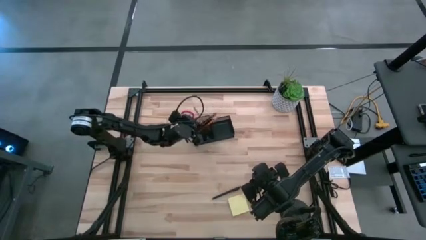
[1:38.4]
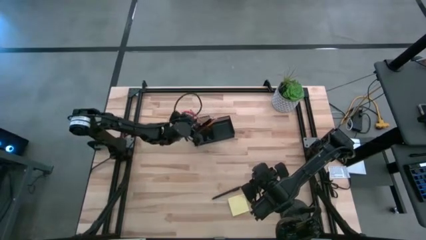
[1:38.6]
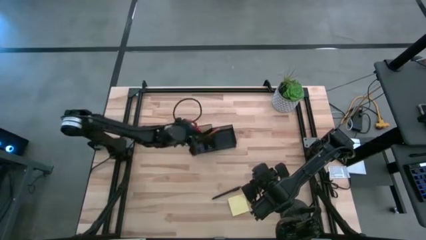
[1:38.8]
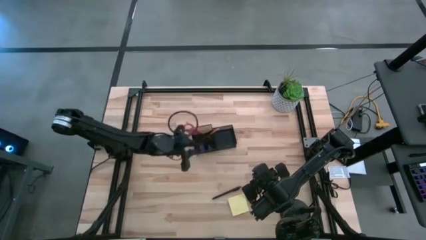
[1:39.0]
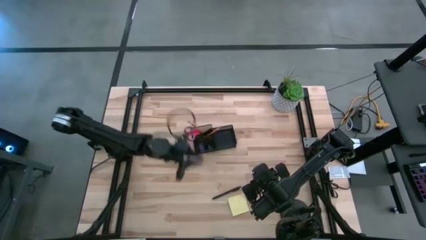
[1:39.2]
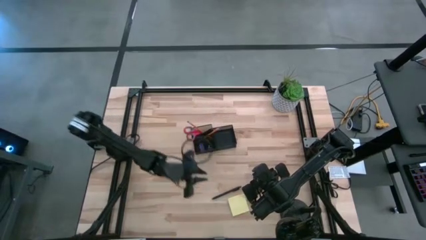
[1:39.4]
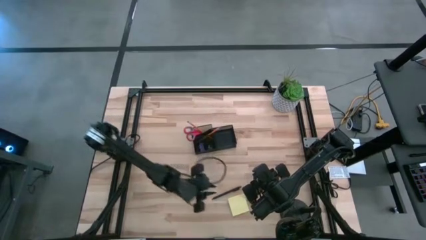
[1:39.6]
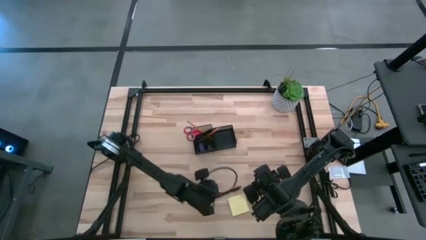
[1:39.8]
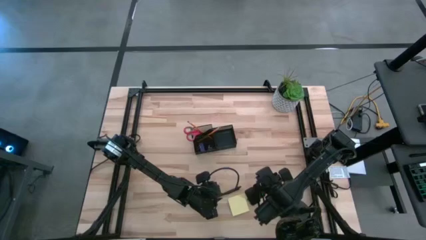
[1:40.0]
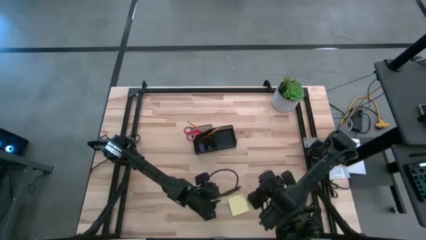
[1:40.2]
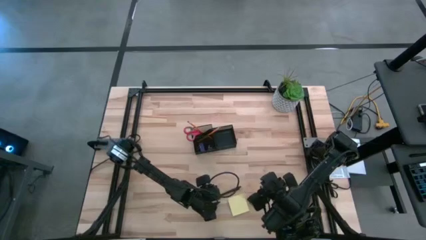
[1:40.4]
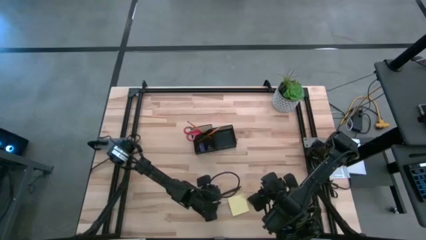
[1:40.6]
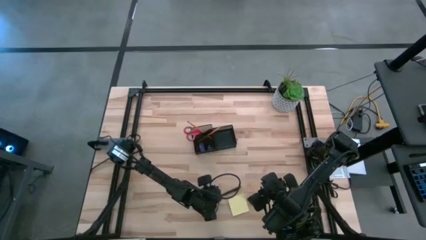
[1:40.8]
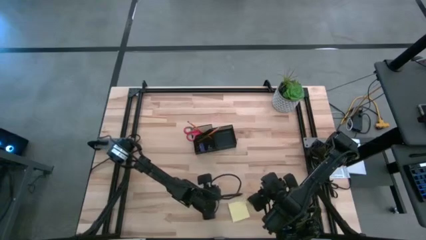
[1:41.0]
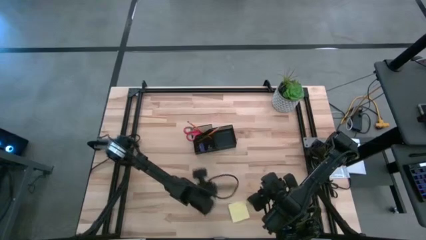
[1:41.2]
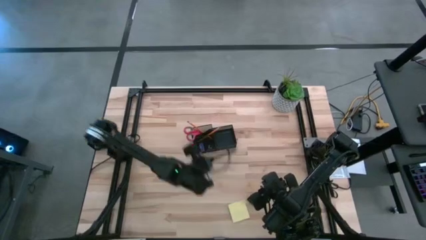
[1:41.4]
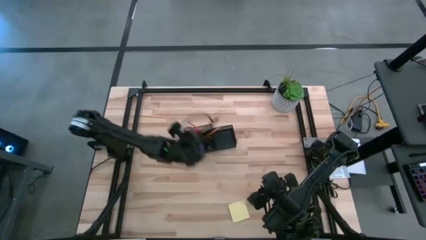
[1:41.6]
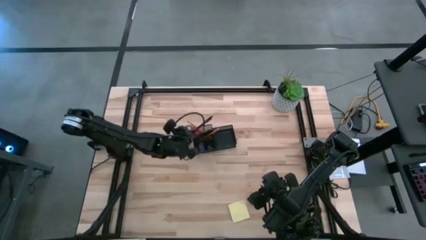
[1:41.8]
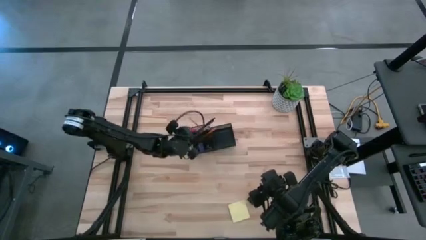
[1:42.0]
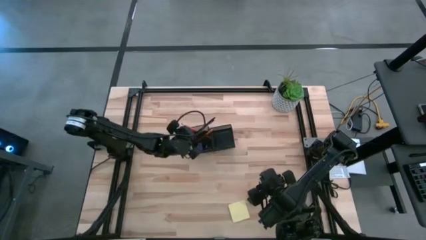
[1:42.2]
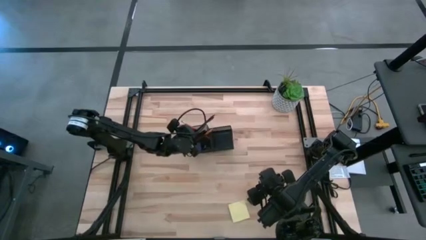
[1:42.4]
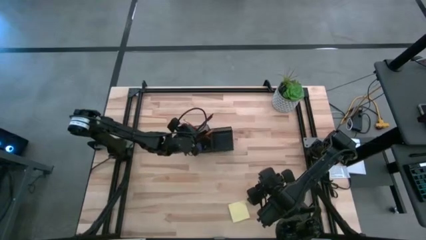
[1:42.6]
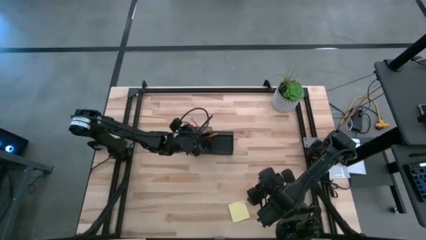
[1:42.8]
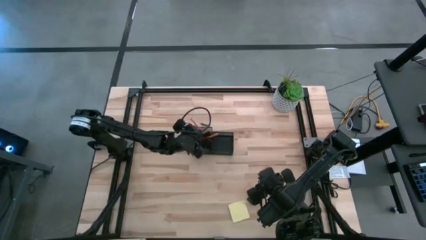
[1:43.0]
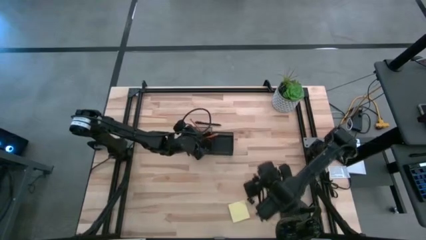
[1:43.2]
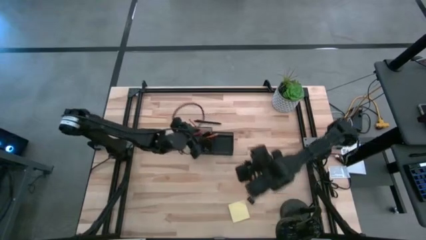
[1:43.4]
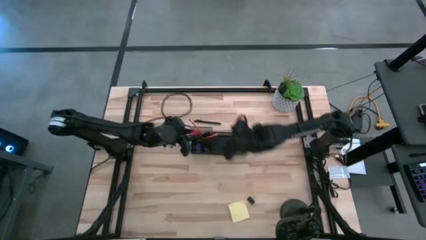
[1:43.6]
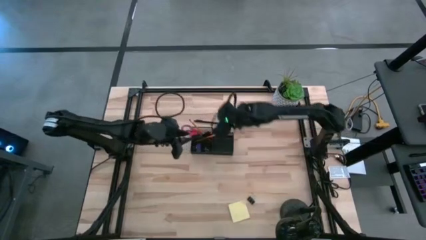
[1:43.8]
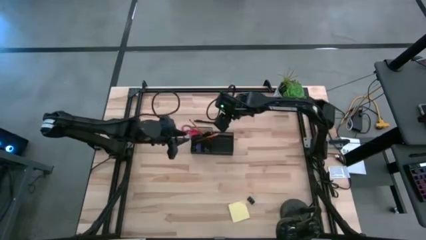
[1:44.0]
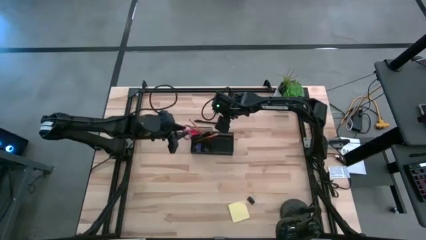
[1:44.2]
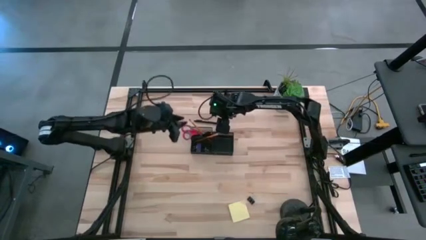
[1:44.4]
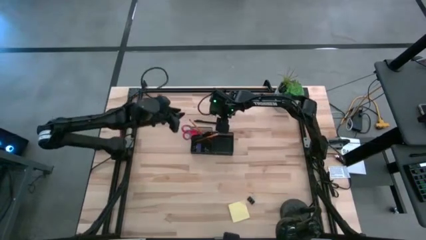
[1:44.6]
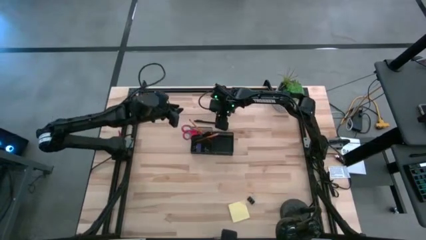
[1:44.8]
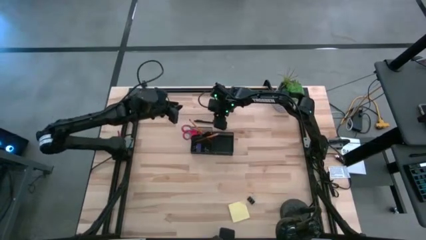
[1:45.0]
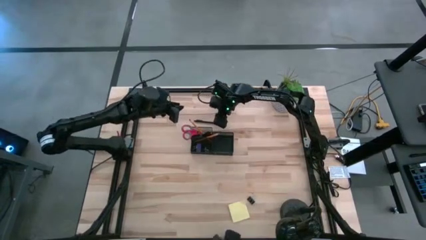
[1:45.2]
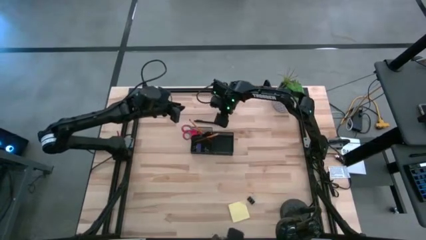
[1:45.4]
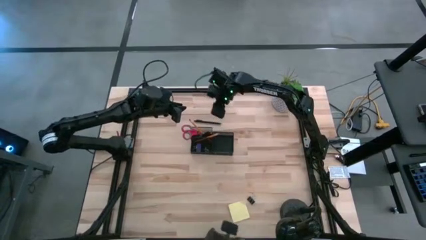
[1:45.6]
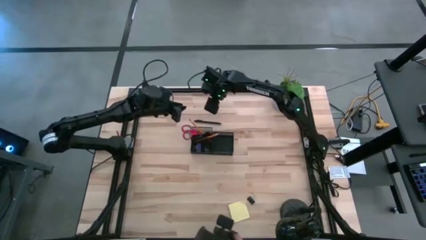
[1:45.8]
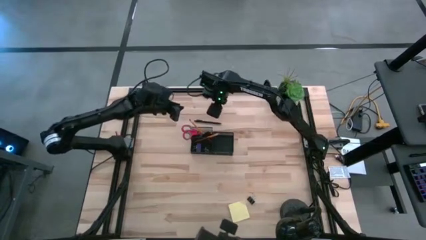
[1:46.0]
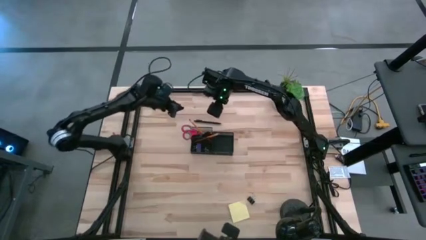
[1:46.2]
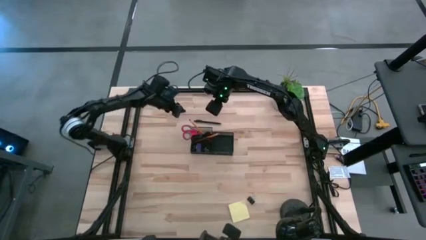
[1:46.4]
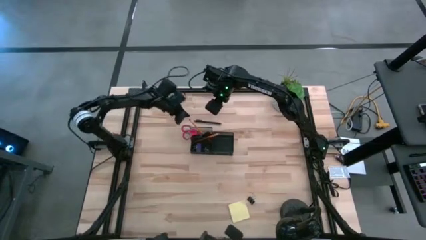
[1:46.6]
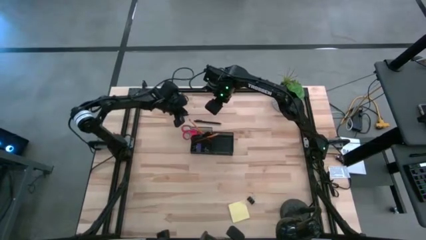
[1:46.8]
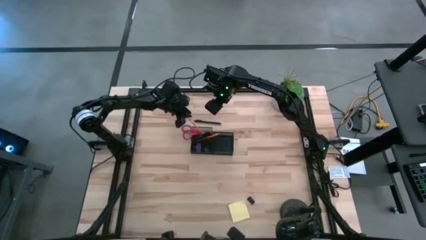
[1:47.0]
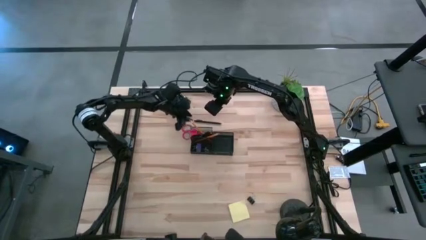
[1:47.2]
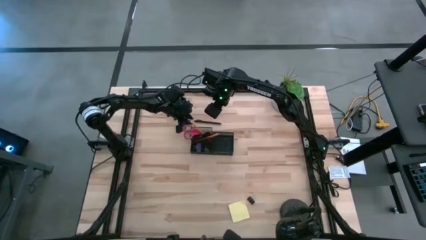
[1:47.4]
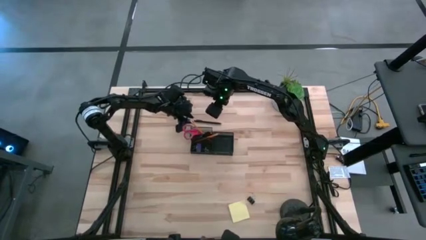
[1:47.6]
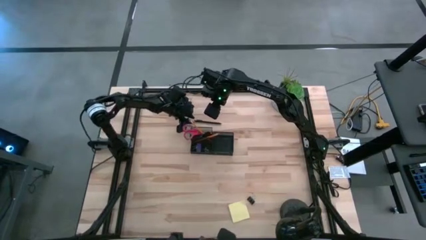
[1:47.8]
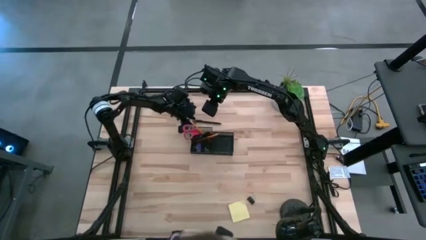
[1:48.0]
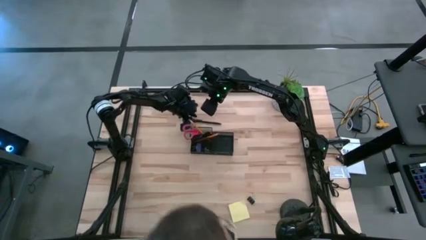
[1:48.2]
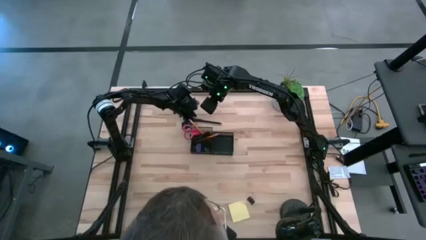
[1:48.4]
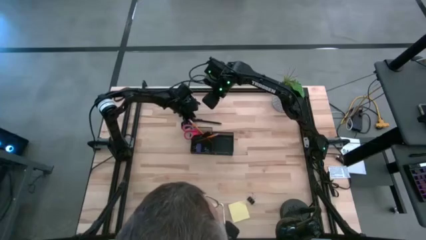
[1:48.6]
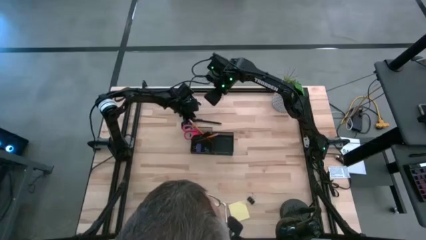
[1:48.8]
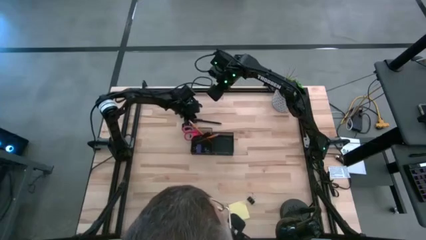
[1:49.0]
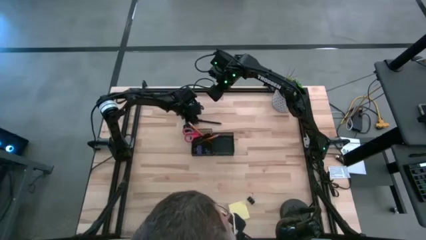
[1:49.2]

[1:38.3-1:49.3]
Task: Pick and place office supplies into organizer
Put the pen into the top left section of the desk organizer

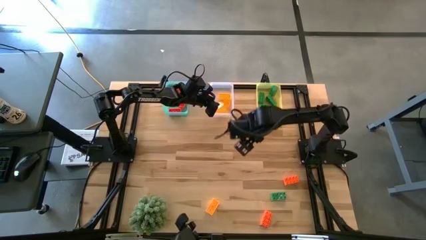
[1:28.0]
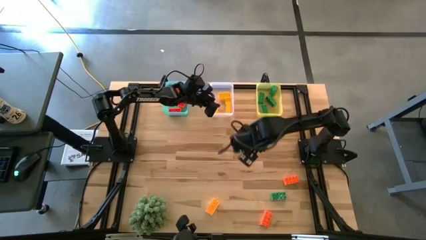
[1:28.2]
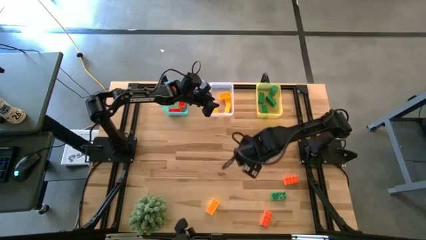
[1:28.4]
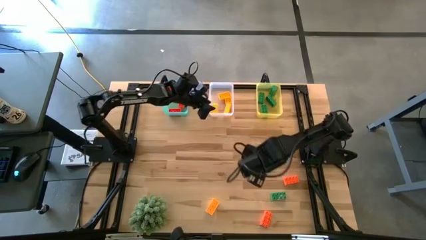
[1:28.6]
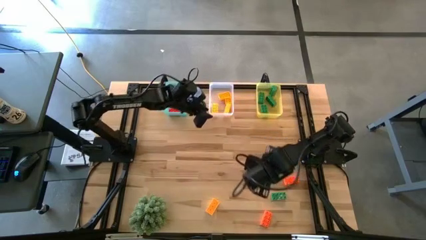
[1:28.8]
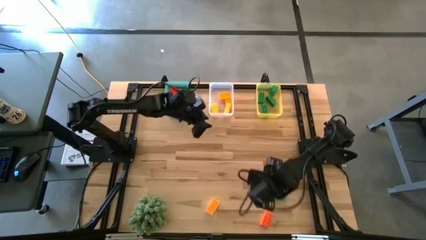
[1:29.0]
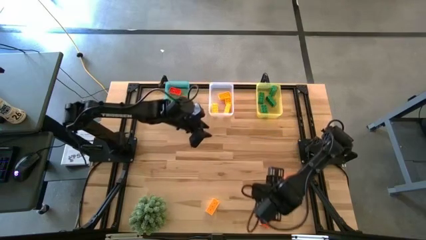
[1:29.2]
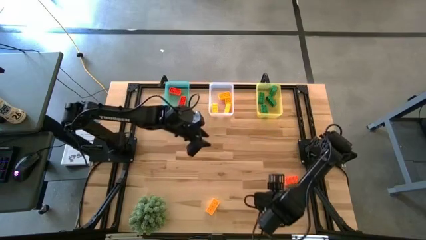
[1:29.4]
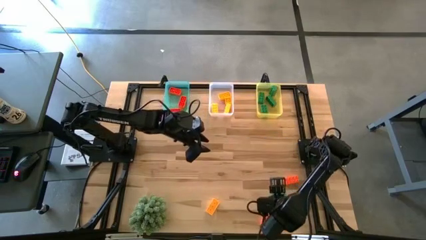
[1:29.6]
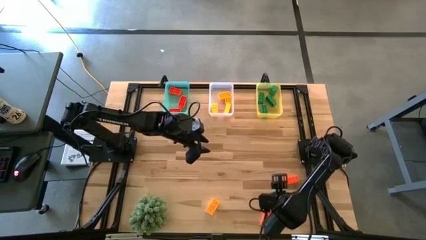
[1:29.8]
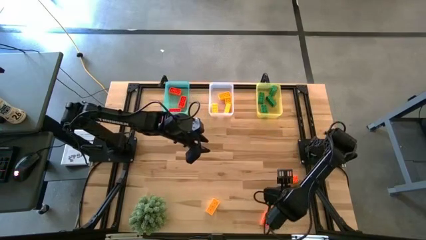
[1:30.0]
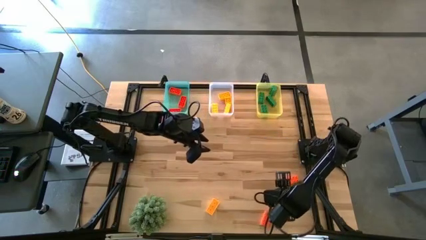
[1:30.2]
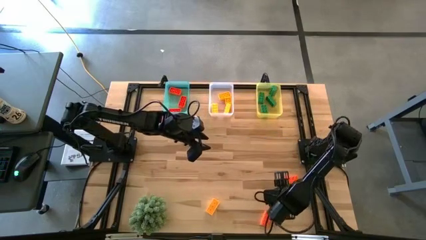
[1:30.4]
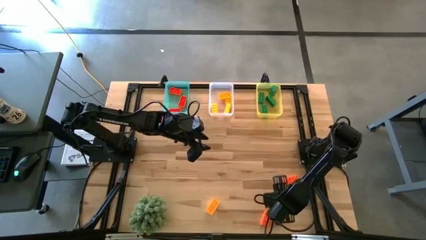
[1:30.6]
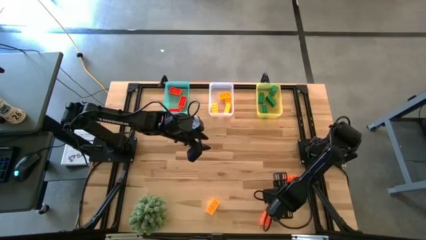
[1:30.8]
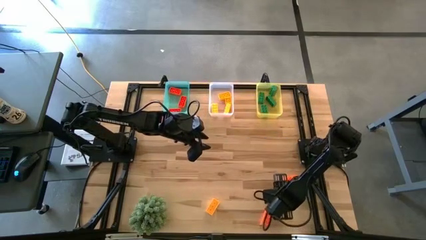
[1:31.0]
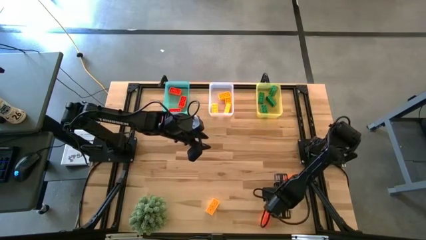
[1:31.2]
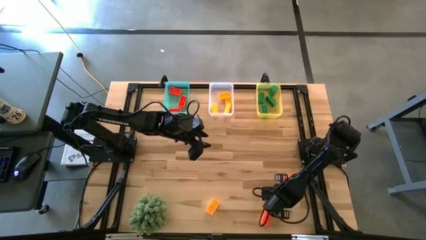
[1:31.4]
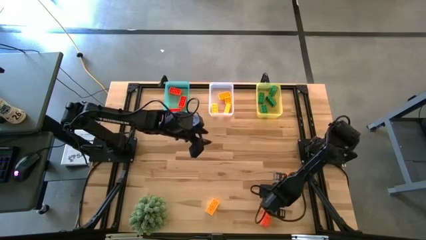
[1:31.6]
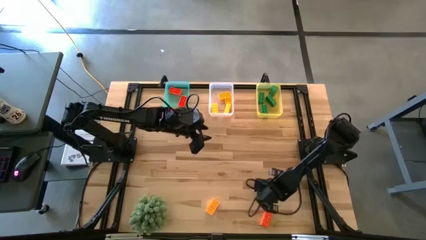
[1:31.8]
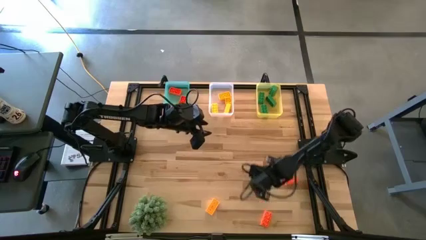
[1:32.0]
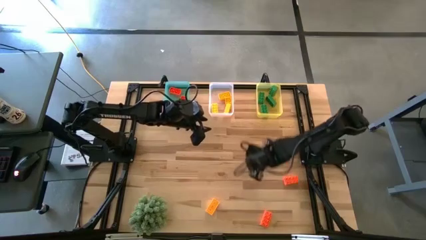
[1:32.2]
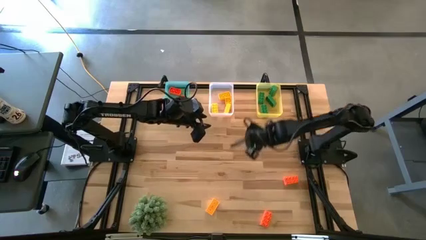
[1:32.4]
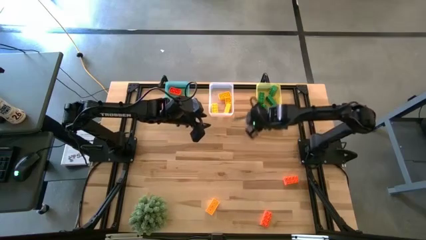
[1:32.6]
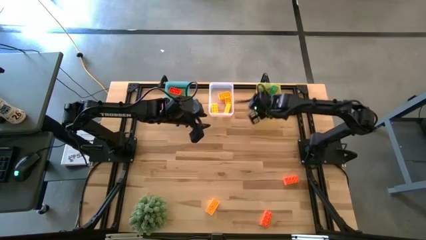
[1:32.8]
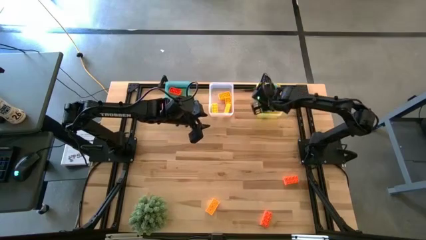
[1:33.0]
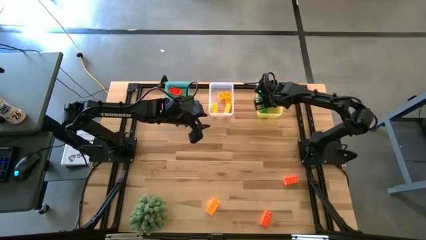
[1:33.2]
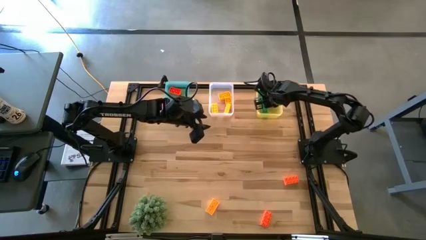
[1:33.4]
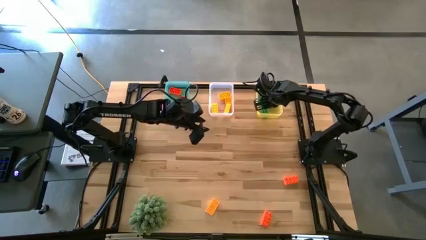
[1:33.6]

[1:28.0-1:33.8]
Task: Sort & place blocks by color
Put the green game piece into the yellow bin
